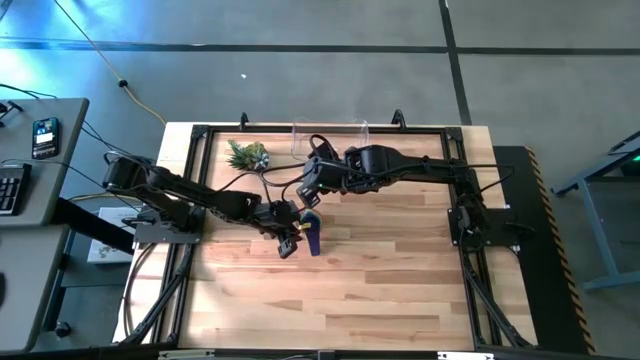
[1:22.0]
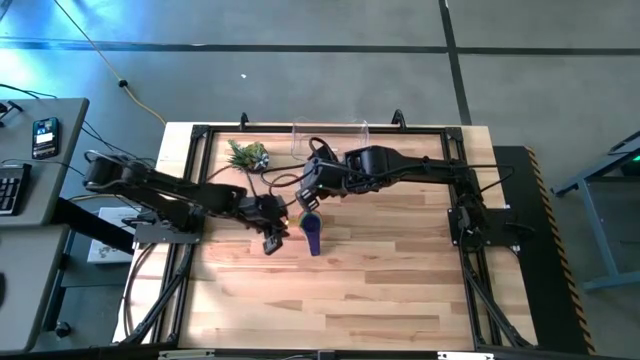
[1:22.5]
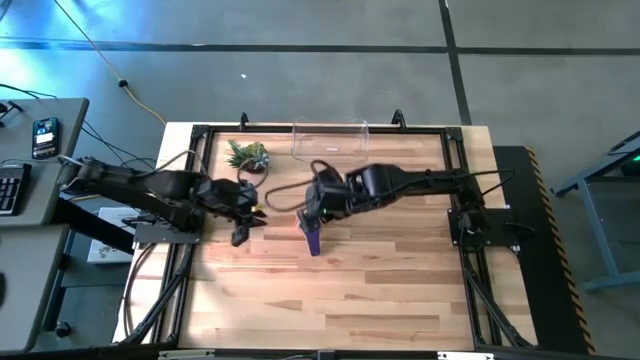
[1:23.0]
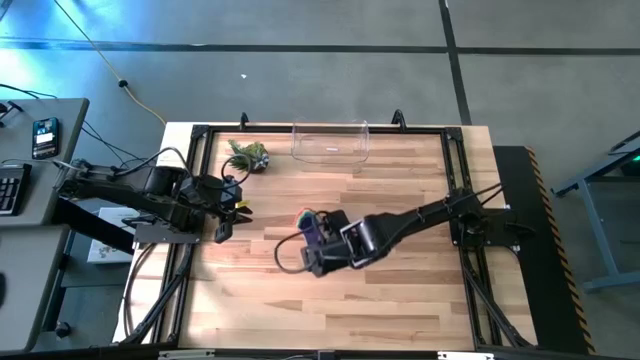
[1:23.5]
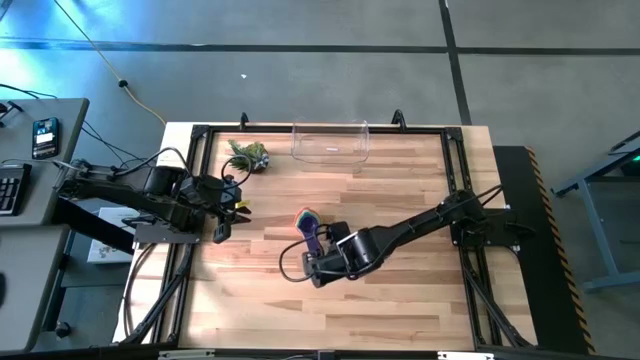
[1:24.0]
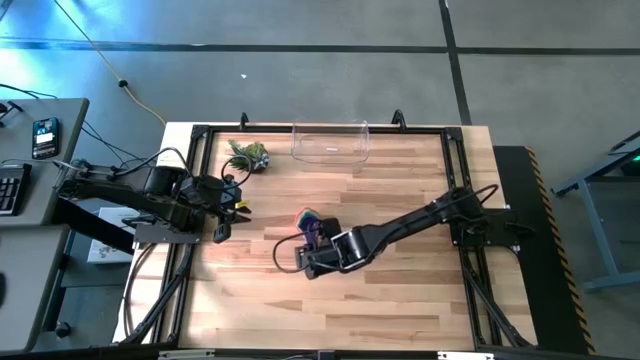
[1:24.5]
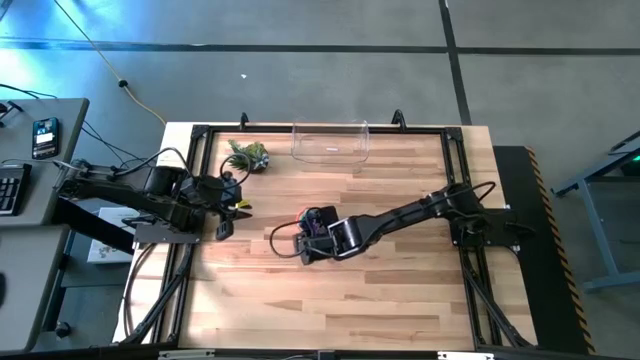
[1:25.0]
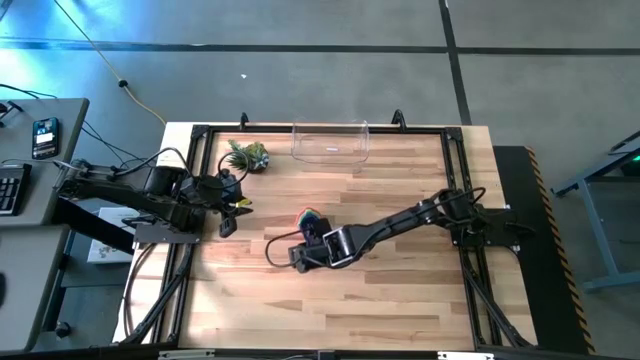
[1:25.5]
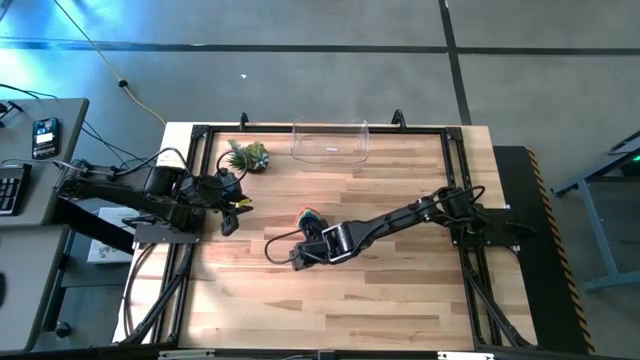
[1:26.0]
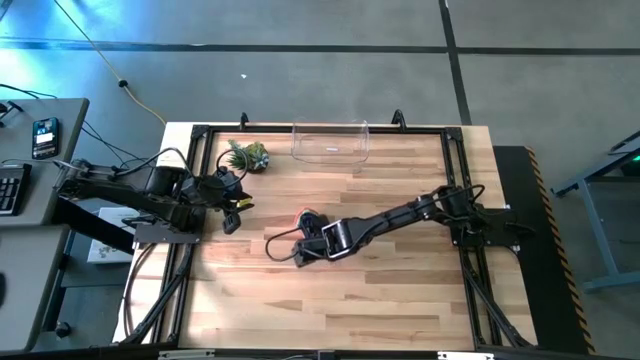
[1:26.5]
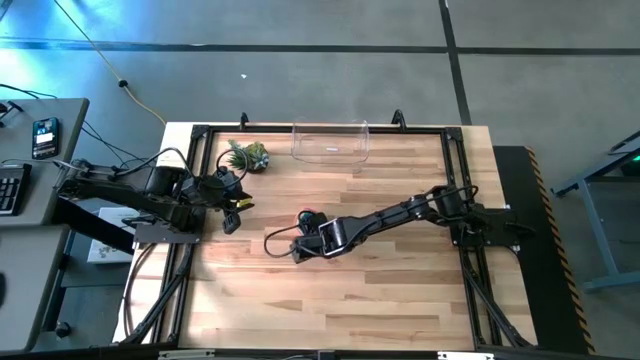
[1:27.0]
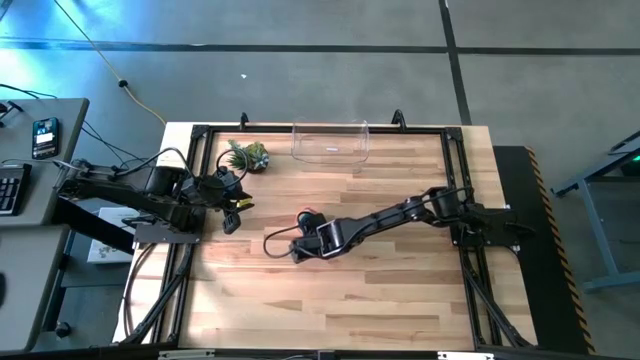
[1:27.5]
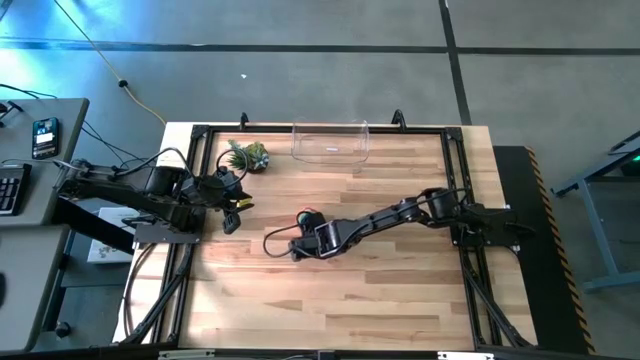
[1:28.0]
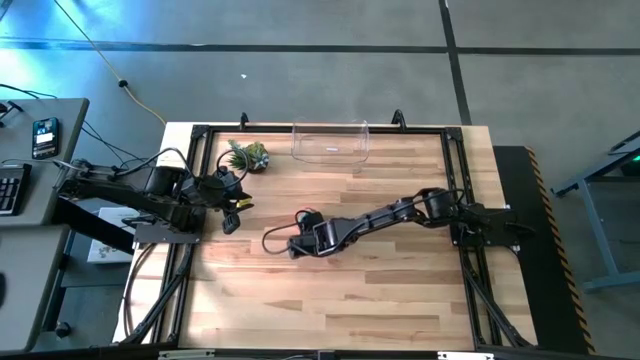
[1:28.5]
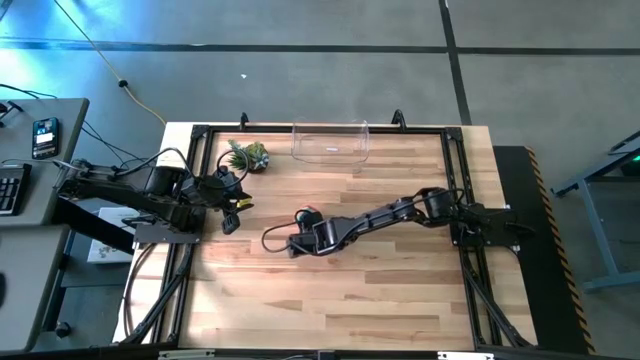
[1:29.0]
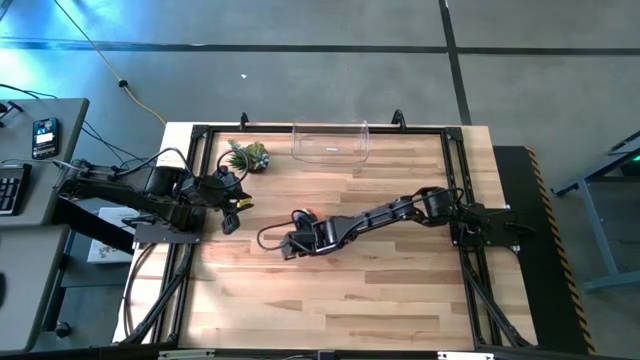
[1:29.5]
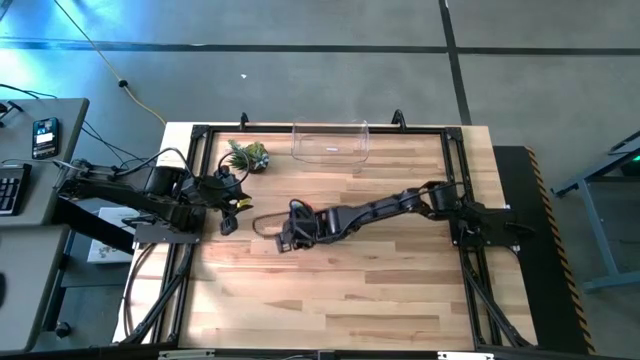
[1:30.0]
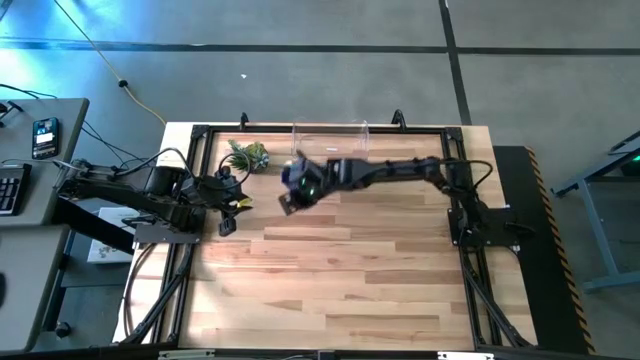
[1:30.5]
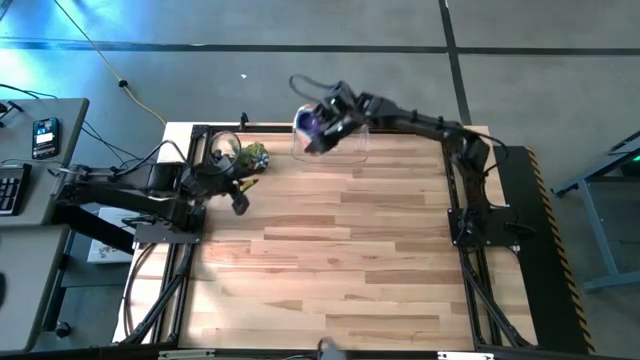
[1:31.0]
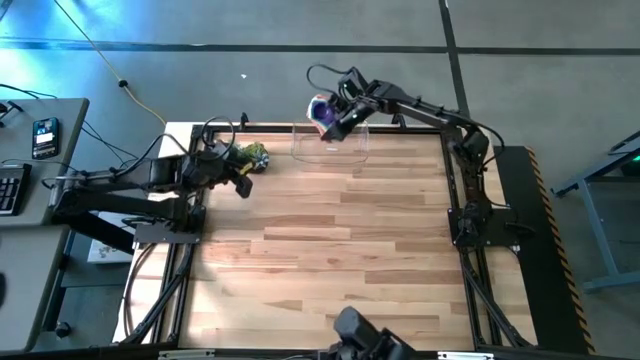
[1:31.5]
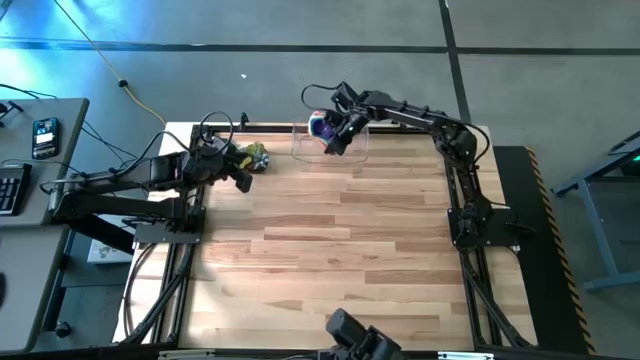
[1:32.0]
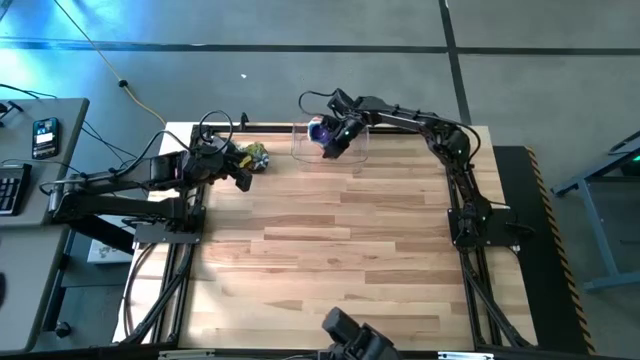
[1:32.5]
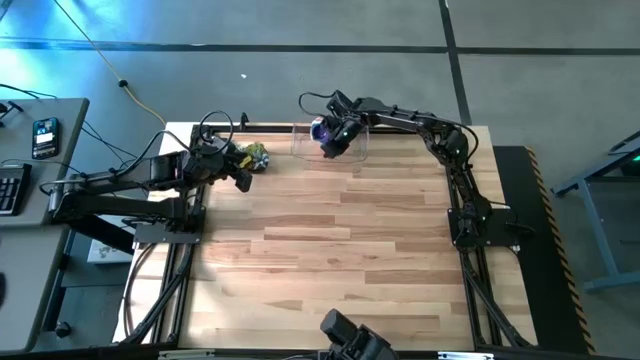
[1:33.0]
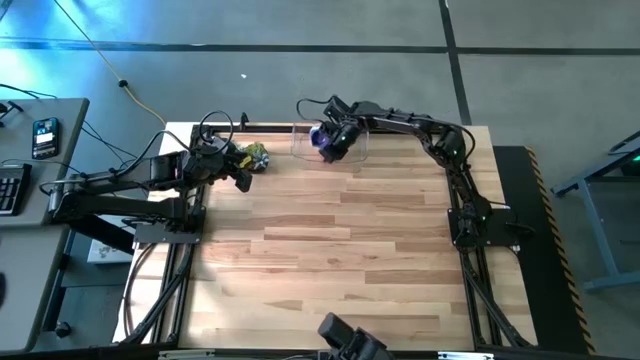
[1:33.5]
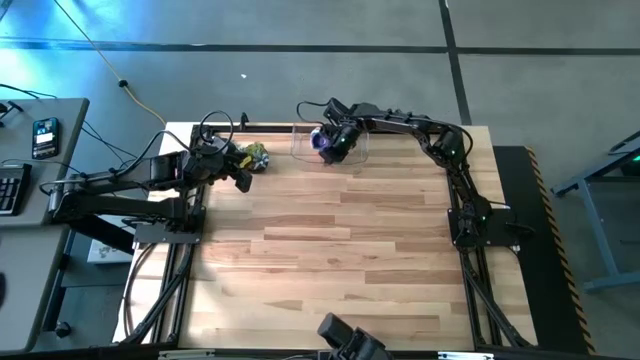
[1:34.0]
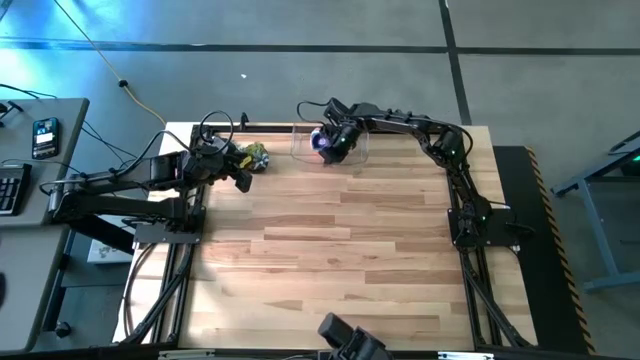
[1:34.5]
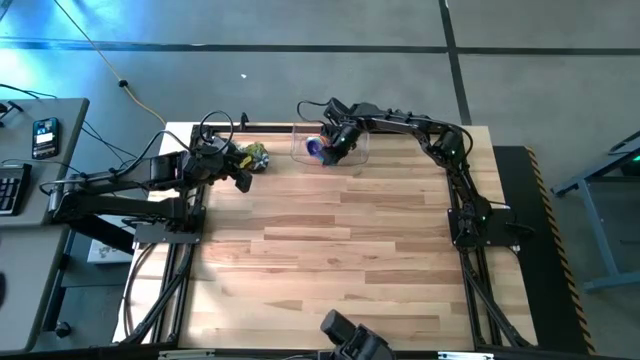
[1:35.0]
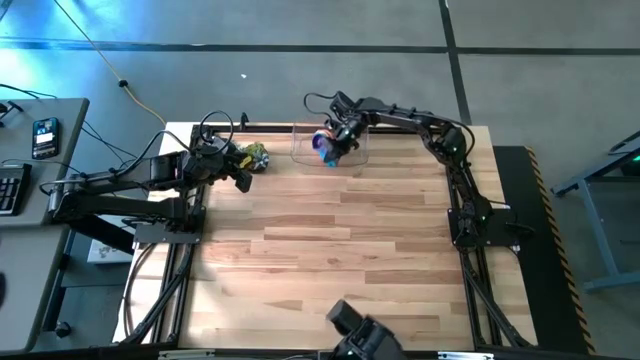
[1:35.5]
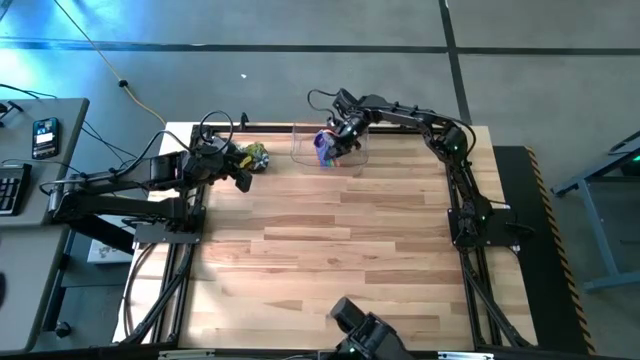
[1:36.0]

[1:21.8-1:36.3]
Task: Nest measuring cups in basket
Put the nested measuring cups into the transparent bin

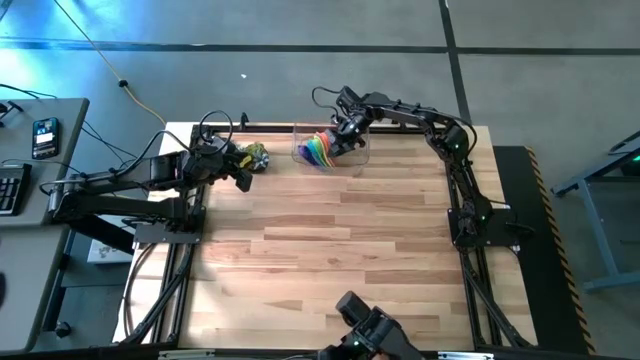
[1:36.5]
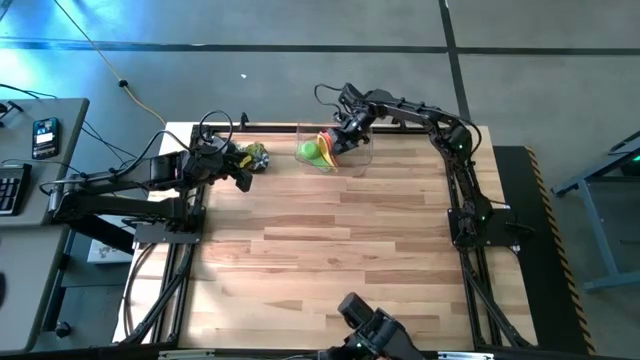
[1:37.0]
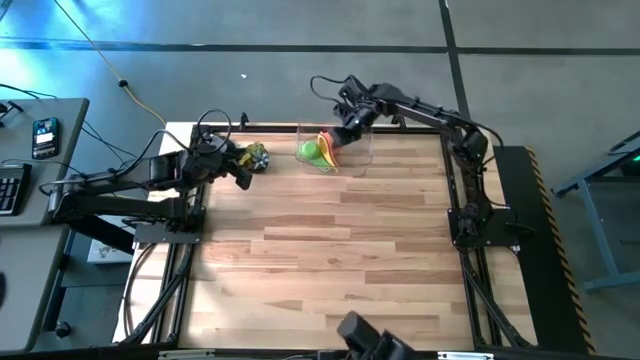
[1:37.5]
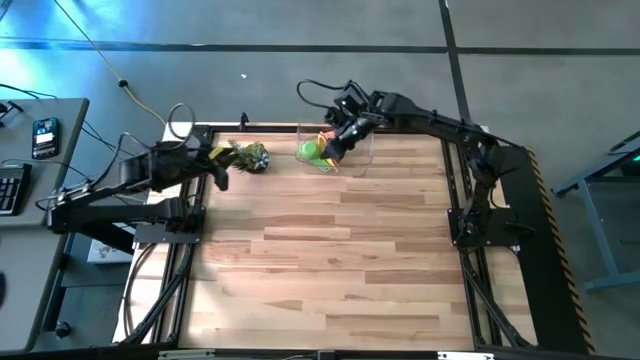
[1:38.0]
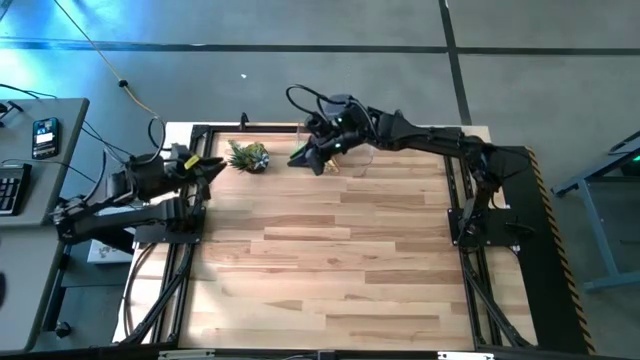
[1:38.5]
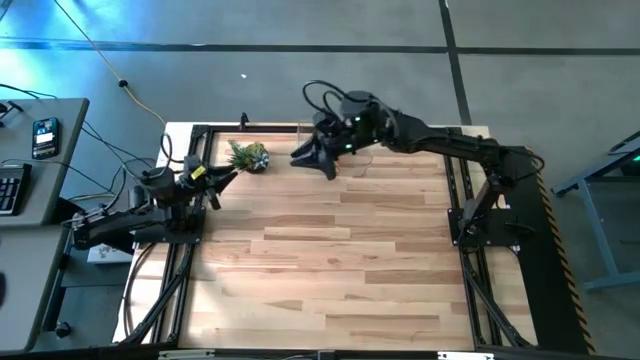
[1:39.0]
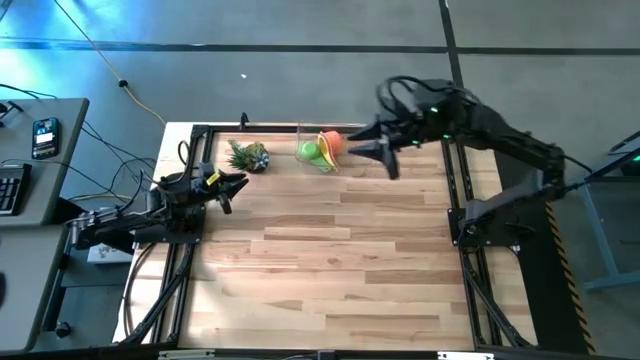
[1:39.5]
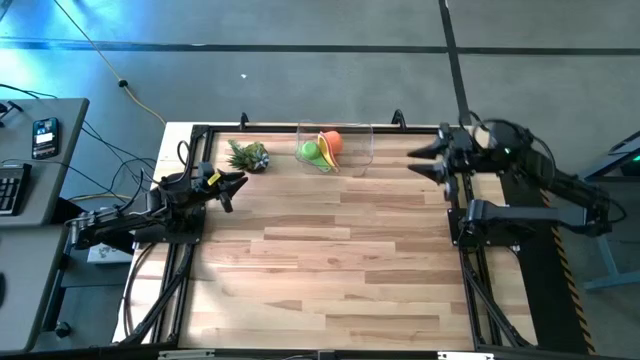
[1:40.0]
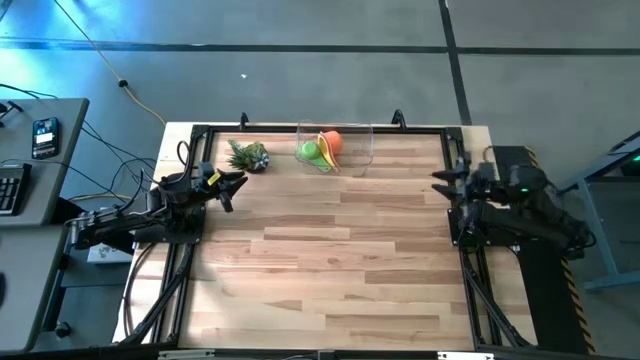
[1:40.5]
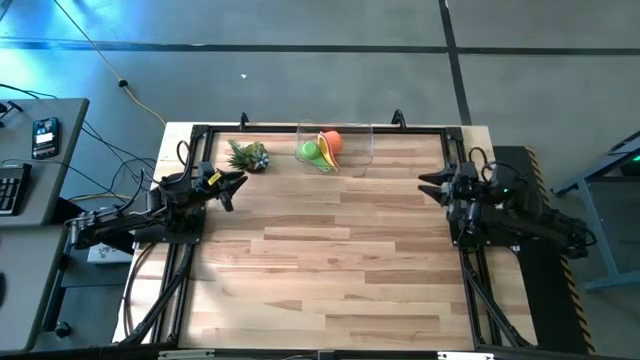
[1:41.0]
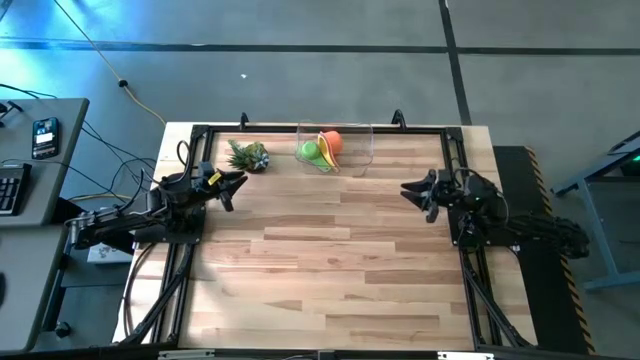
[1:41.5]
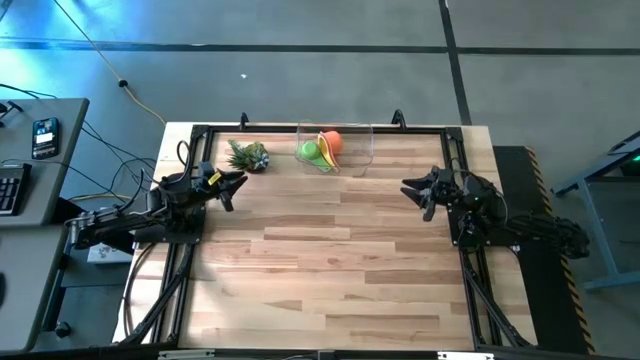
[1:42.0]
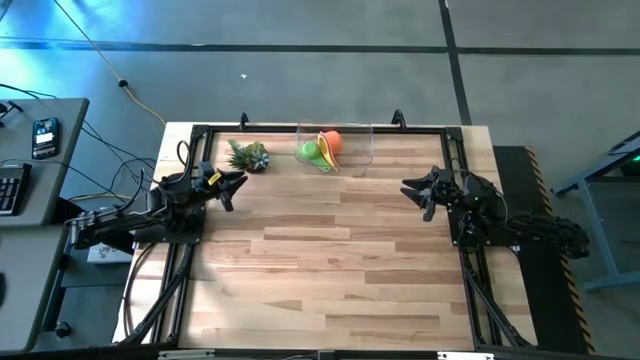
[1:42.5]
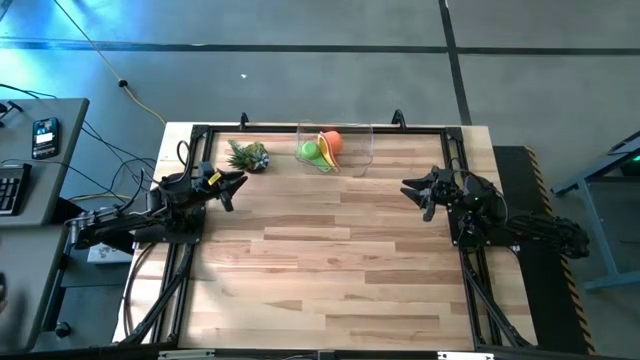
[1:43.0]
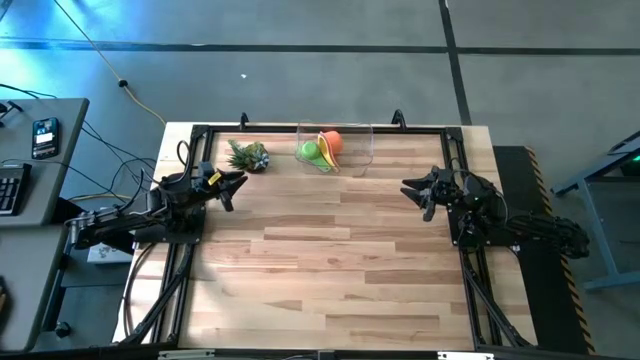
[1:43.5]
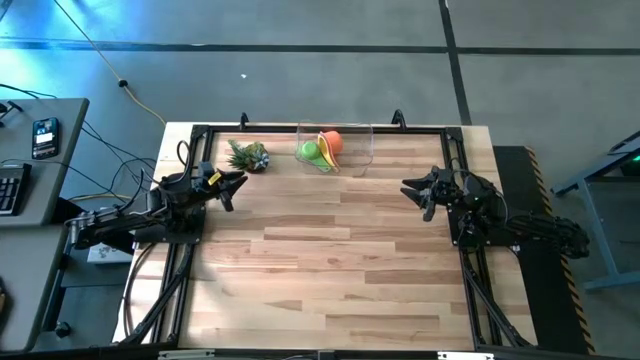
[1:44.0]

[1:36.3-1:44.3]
Return to Home Position
